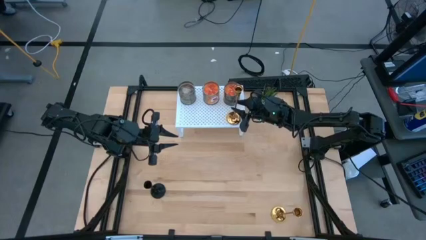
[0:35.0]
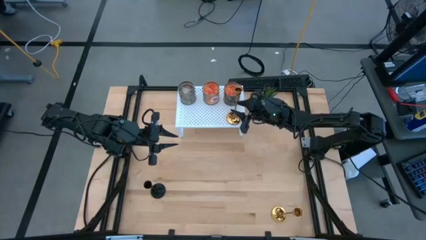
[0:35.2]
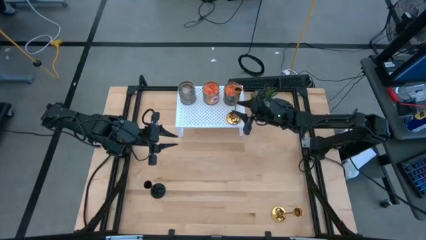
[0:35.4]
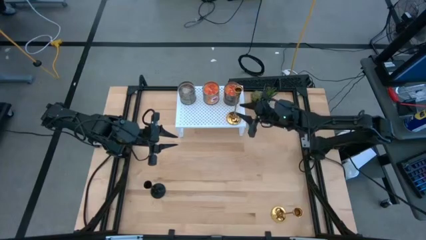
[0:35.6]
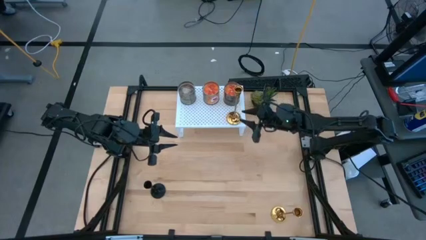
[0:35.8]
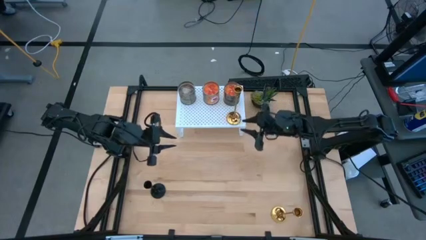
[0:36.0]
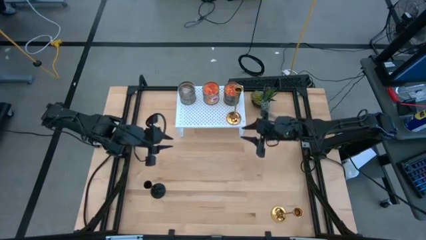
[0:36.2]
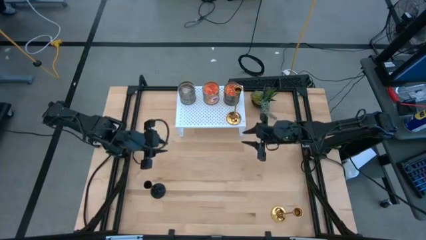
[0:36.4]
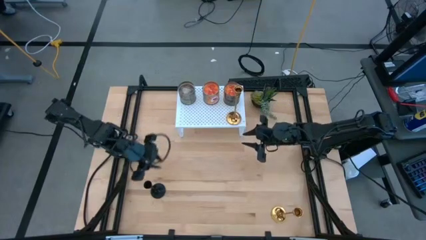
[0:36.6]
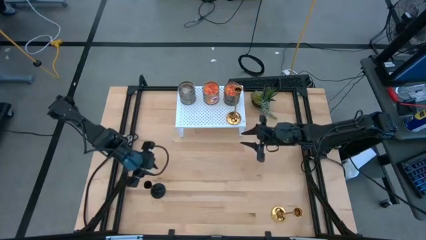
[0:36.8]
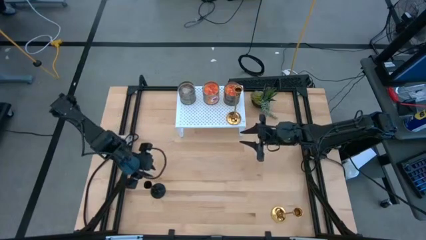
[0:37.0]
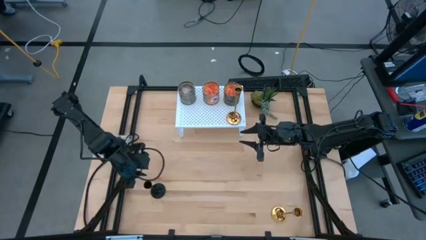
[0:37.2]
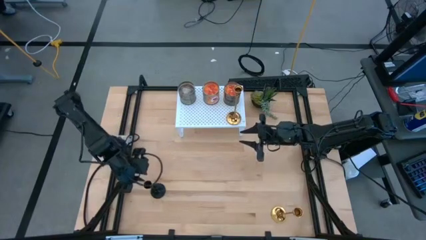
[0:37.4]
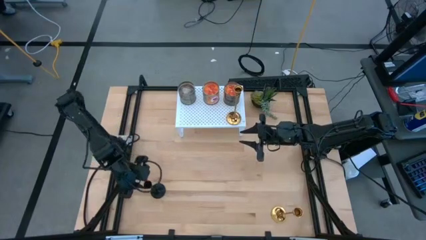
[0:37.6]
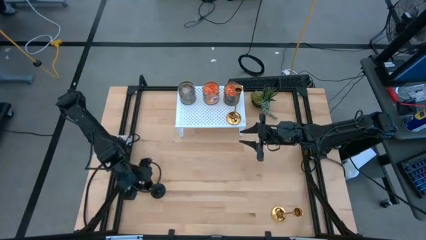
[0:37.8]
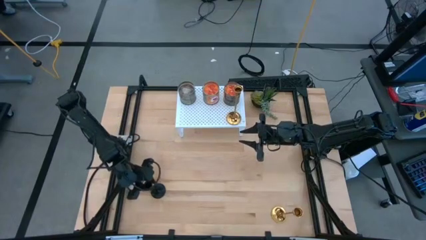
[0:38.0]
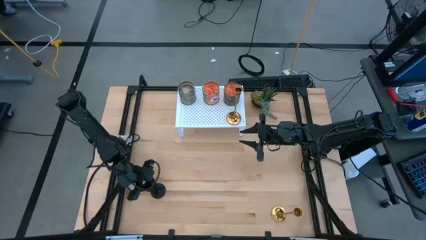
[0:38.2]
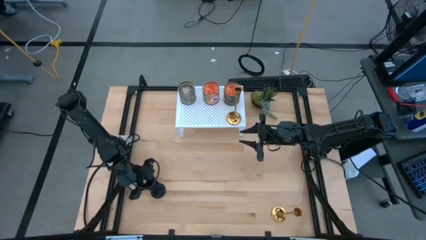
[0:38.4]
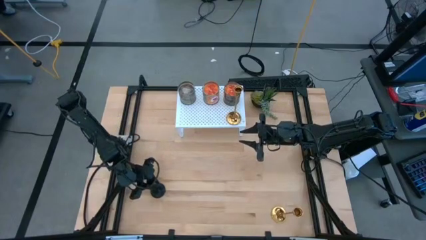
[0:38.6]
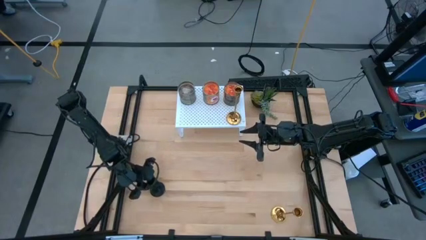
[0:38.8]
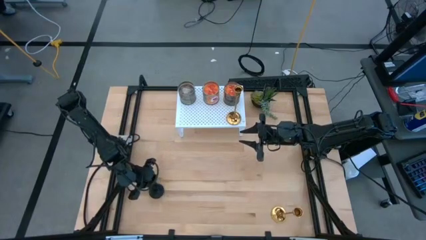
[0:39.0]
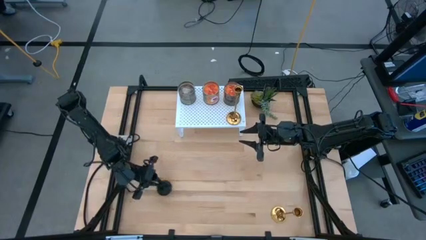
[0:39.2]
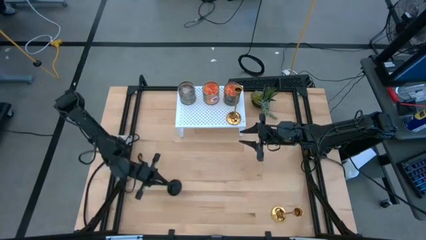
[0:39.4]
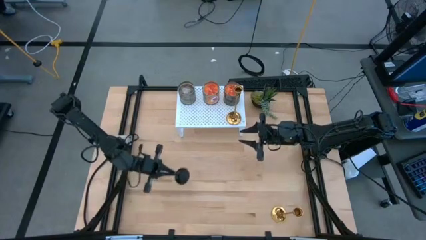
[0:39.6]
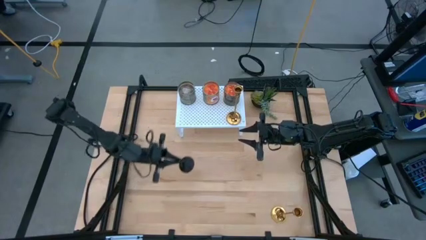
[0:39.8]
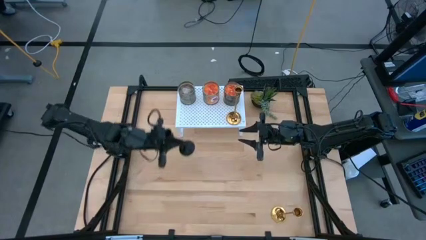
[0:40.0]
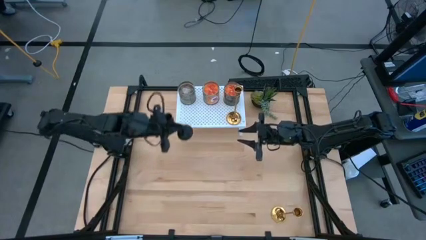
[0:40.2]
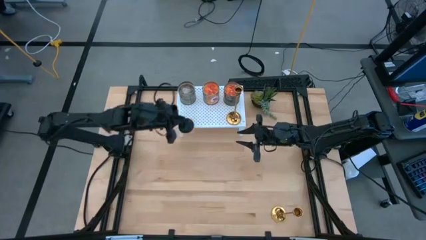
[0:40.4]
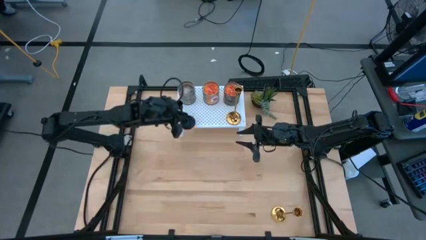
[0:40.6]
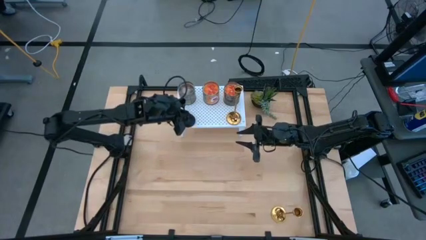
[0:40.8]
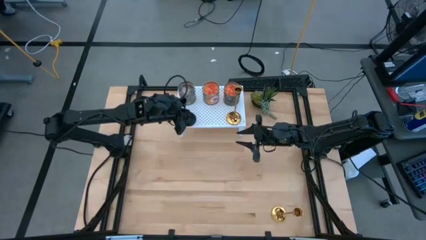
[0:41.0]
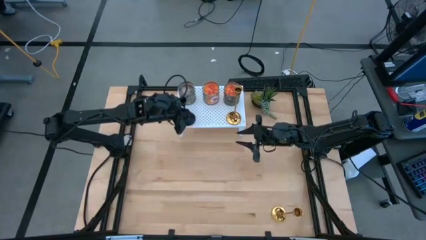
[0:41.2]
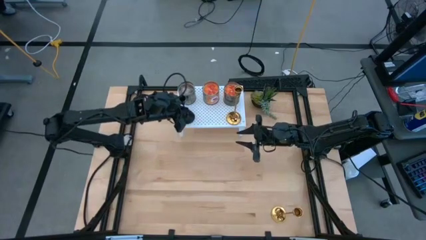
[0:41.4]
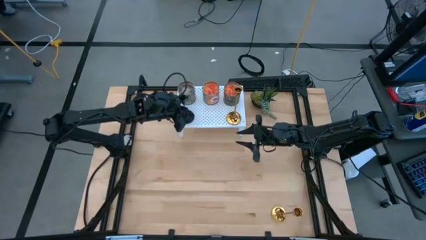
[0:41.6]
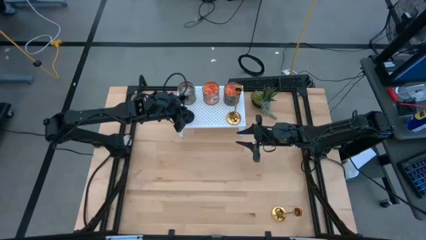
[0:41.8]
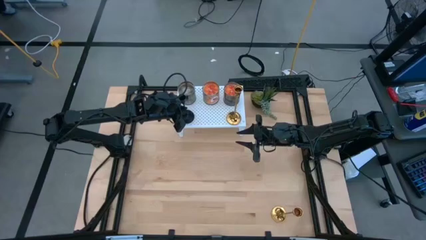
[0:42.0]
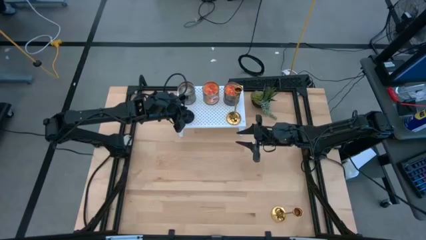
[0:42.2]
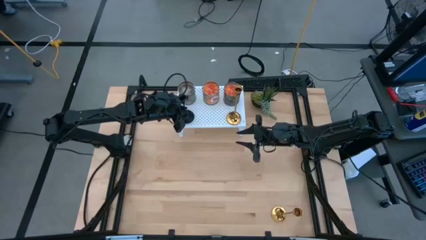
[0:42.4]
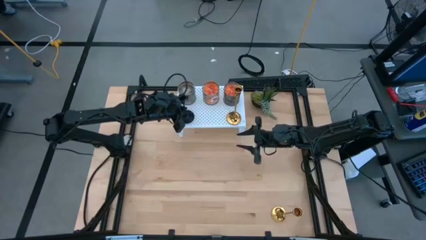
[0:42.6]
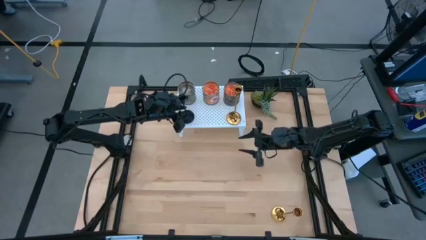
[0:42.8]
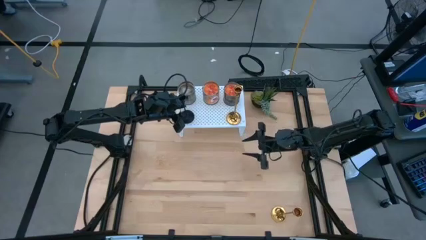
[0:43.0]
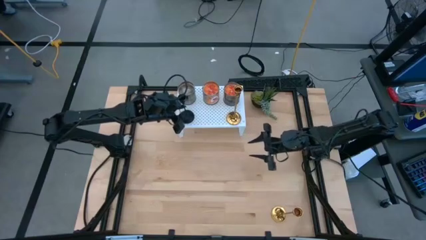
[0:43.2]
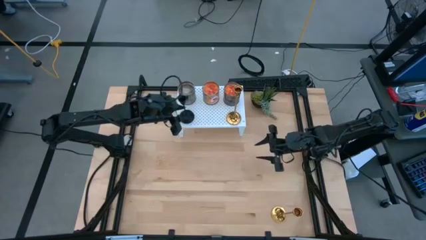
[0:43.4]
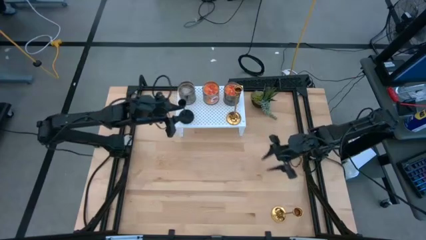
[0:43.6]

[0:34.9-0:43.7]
Task: Pick & Place candle stick holders
Put the black candle holder on the shelf aligned with the other candle holders

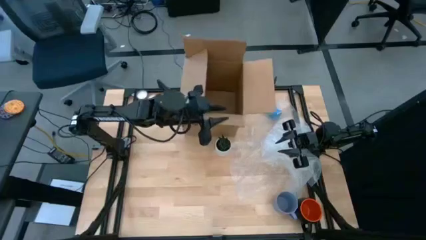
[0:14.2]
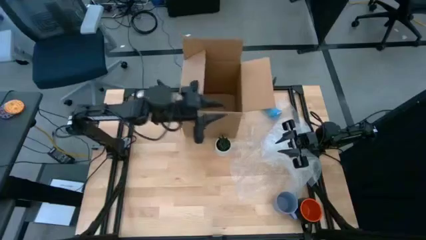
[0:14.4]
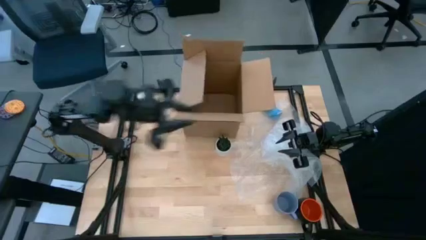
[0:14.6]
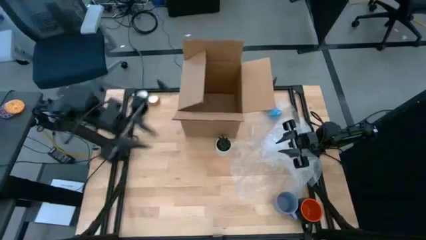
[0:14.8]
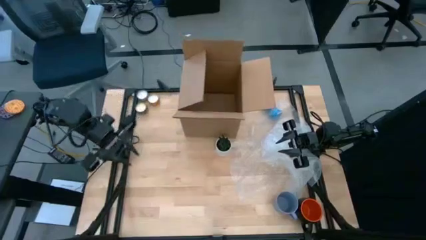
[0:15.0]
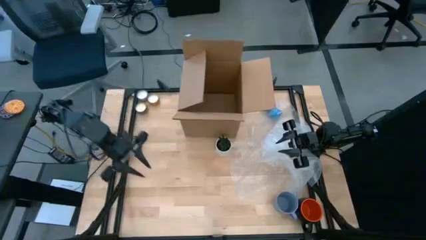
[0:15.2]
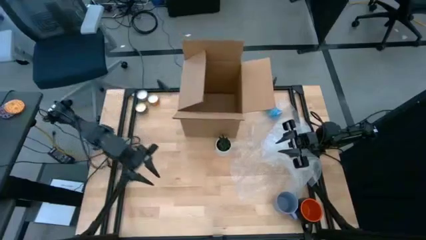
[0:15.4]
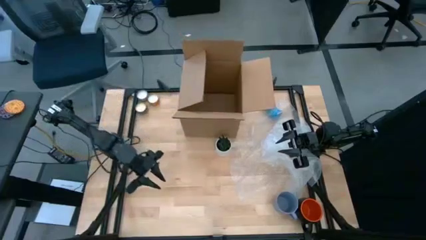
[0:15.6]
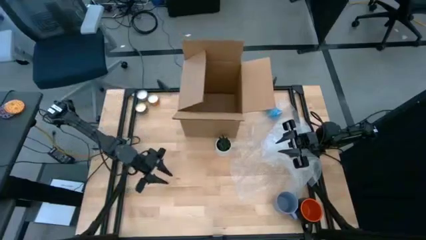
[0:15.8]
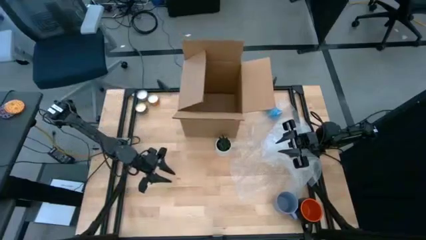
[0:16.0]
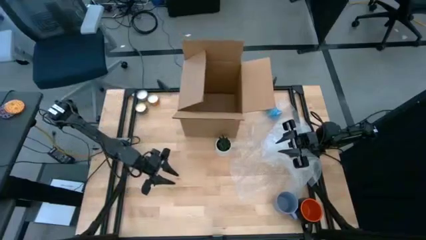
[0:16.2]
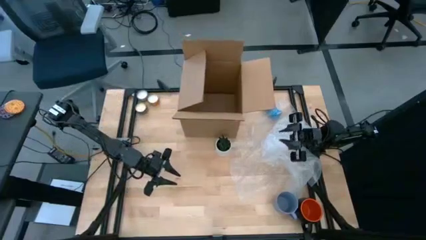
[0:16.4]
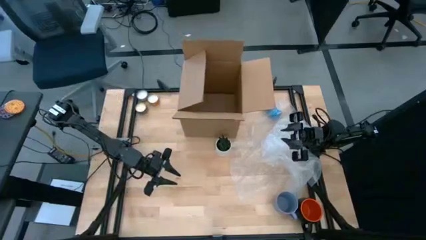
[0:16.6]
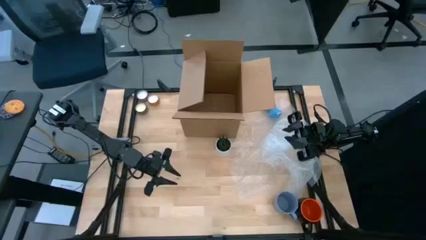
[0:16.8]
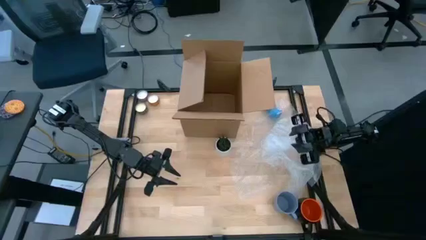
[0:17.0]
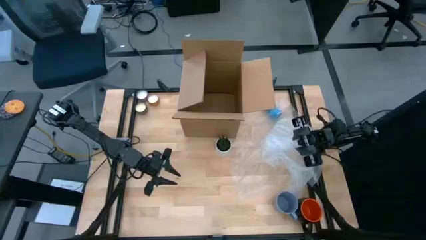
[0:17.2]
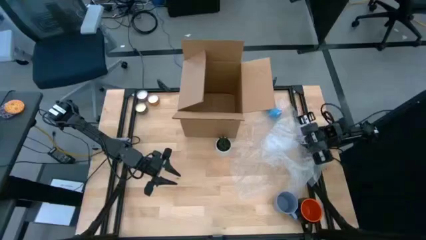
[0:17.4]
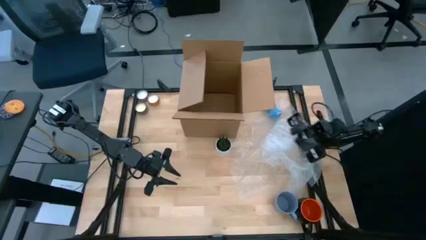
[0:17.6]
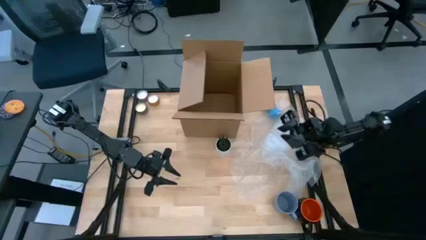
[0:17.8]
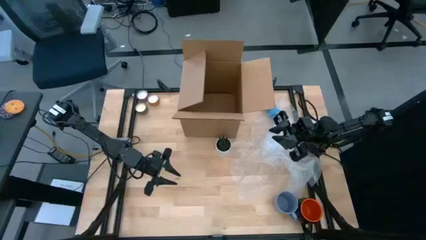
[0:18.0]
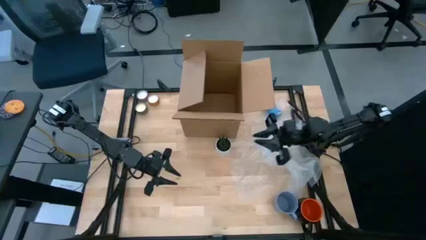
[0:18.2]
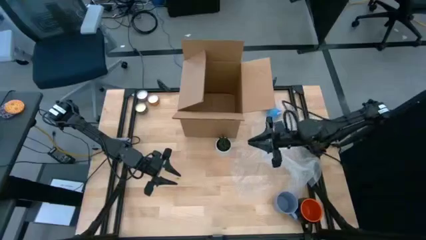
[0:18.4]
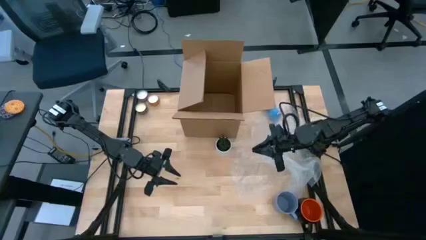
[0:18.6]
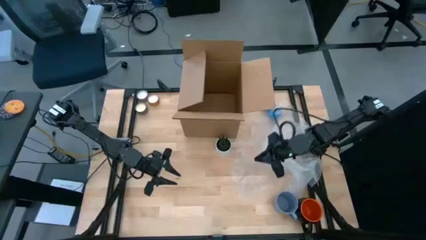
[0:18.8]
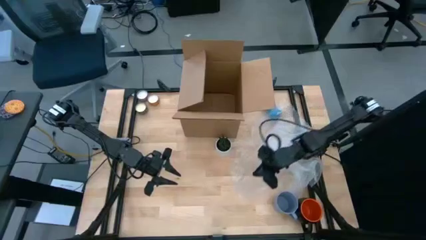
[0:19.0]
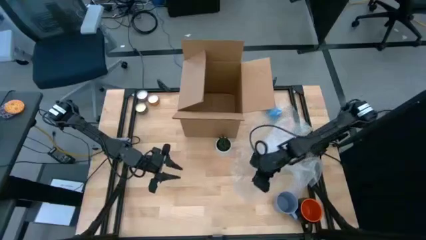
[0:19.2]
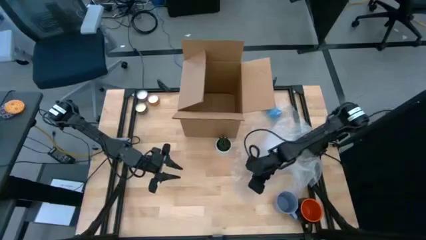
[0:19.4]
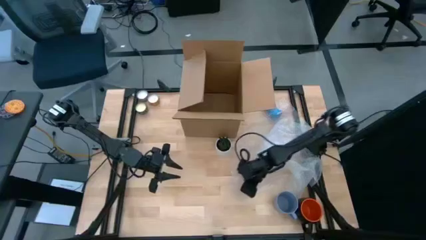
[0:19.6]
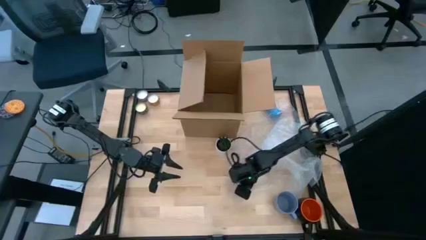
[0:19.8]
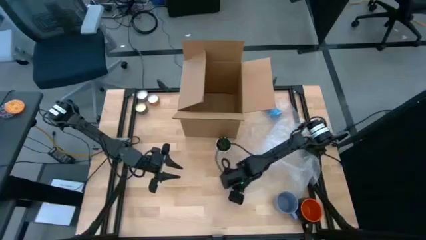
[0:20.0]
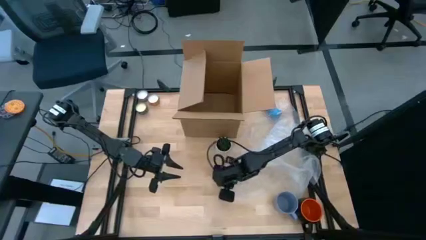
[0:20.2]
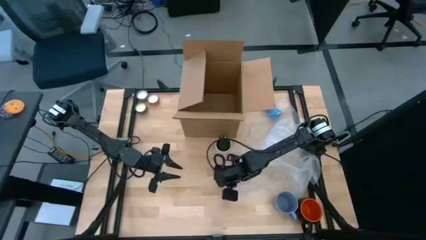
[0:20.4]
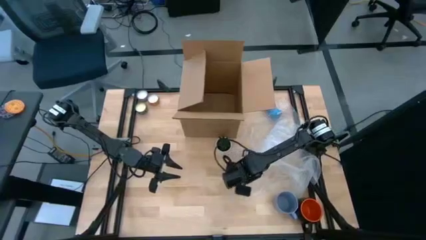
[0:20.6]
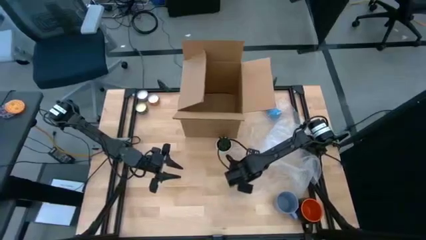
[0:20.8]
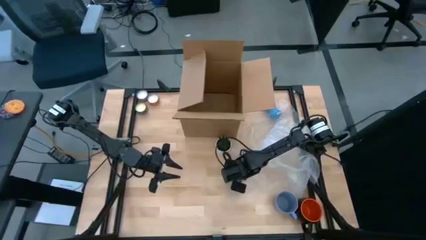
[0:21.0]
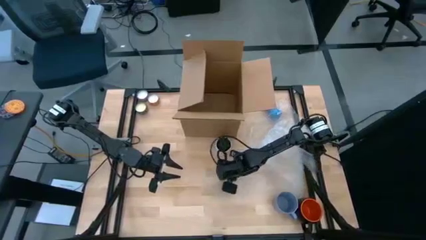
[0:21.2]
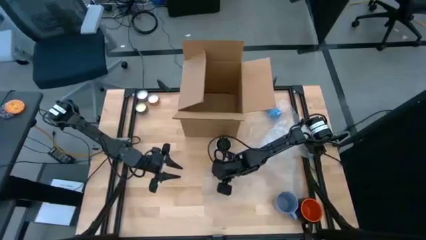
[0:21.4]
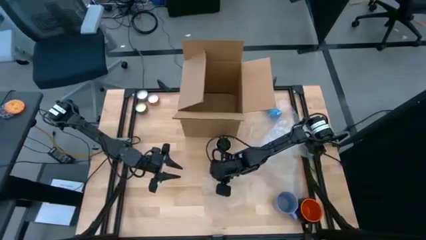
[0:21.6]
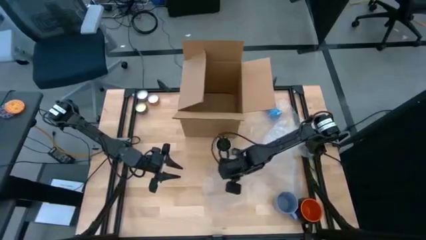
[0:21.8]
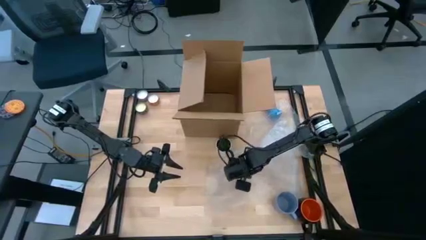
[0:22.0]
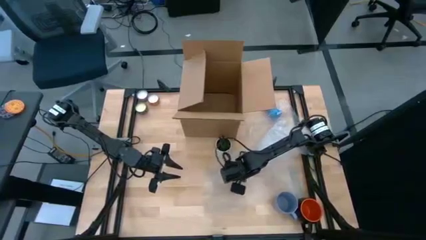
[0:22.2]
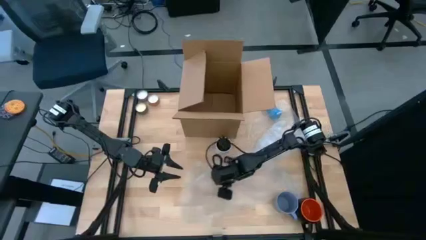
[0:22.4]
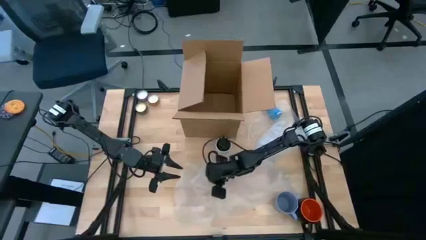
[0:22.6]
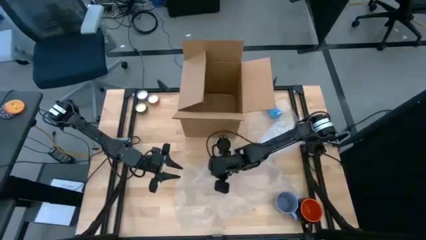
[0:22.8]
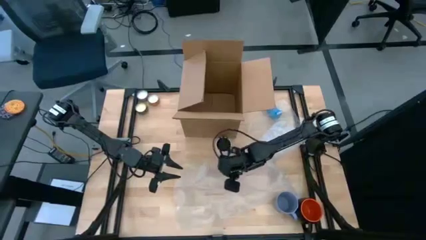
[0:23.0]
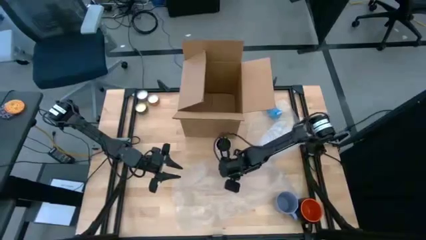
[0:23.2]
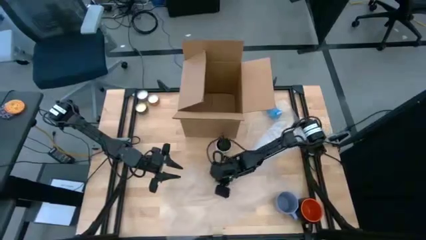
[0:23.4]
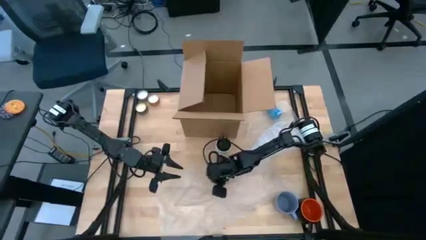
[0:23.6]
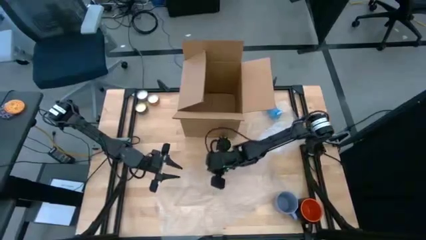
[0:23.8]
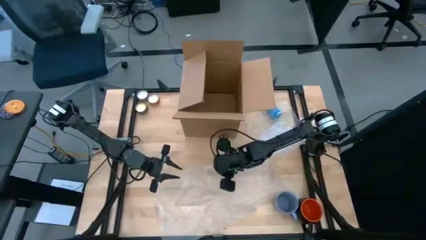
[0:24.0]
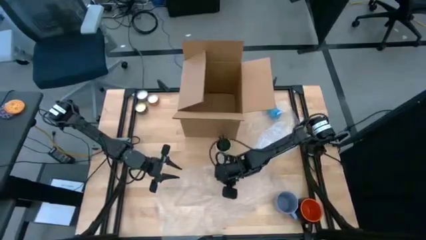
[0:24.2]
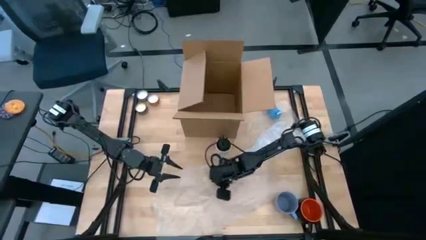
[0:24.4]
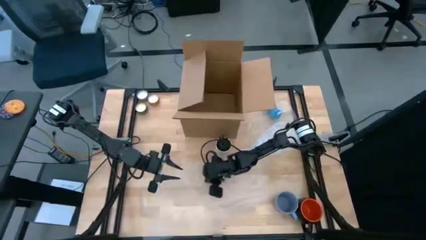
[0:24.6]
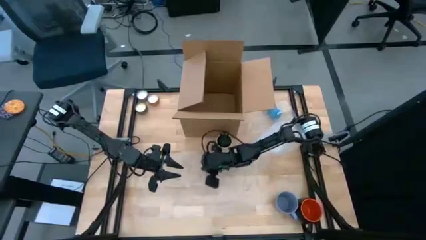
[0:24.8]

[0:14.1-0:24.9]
Task: wrap mug
Prepare the transparent bubble wrap
